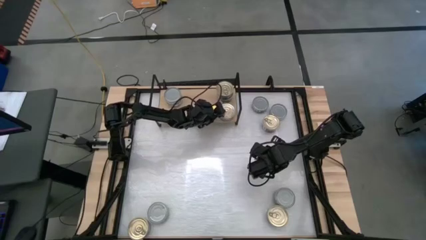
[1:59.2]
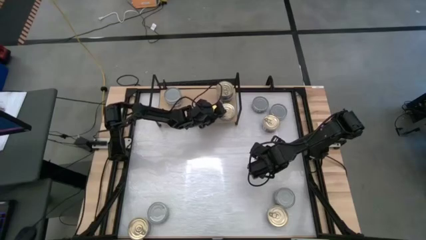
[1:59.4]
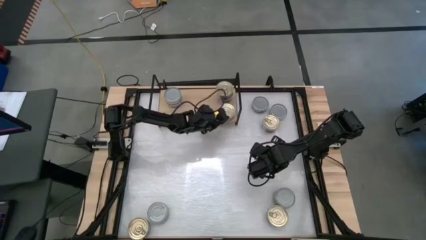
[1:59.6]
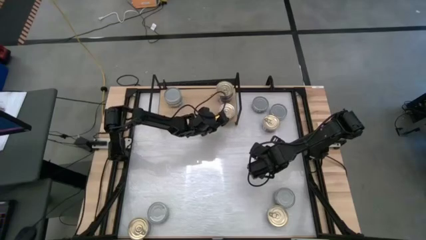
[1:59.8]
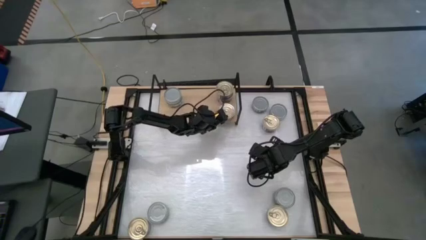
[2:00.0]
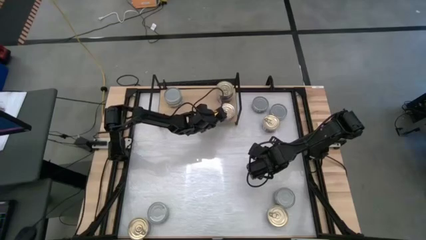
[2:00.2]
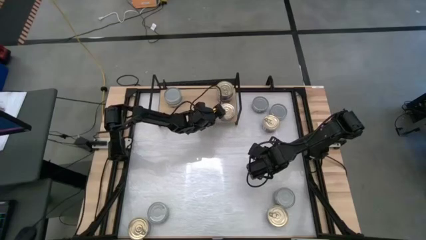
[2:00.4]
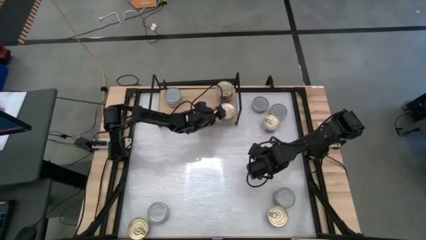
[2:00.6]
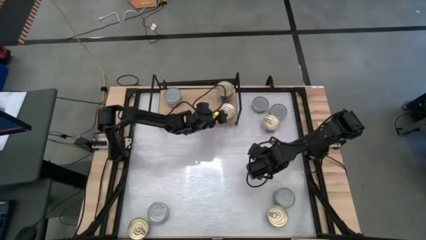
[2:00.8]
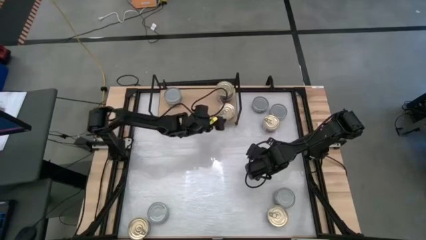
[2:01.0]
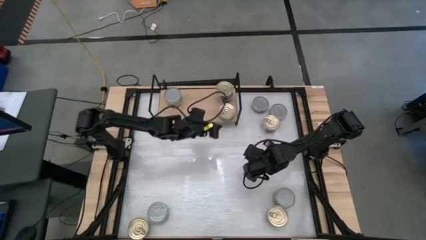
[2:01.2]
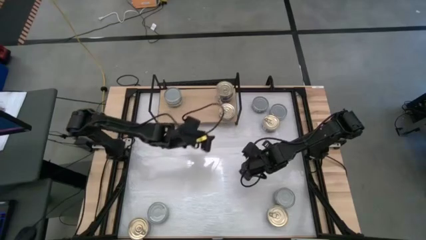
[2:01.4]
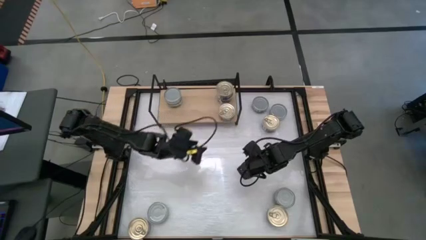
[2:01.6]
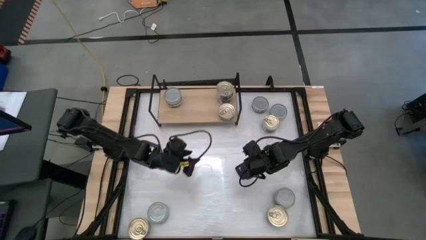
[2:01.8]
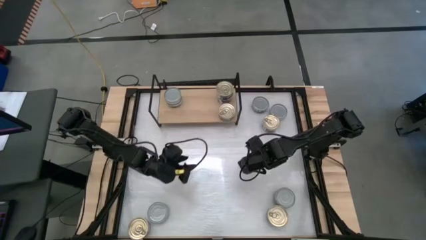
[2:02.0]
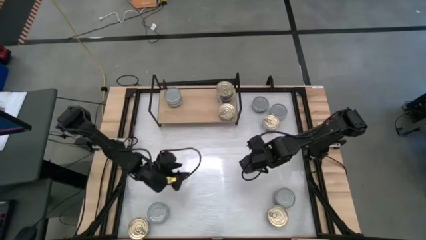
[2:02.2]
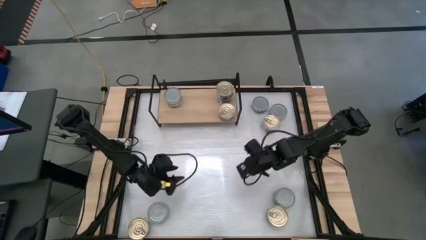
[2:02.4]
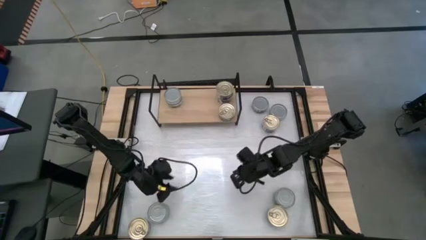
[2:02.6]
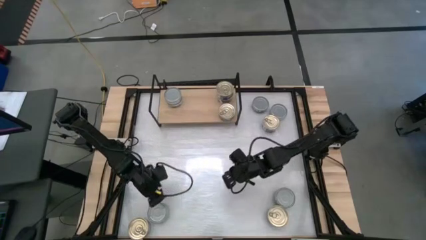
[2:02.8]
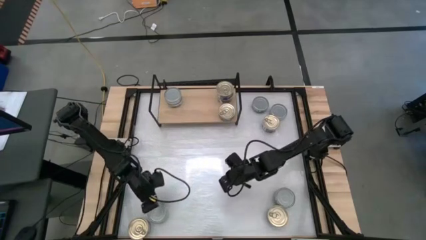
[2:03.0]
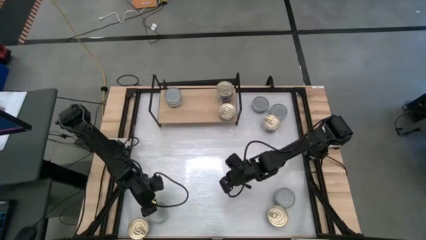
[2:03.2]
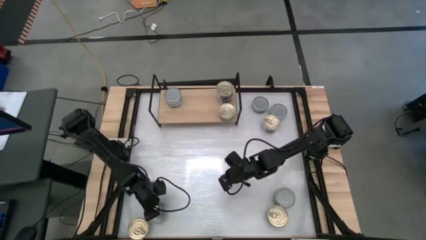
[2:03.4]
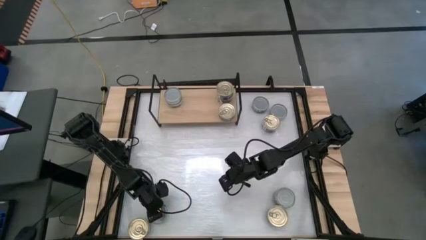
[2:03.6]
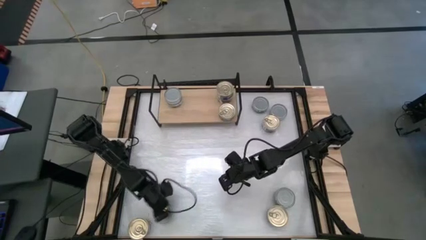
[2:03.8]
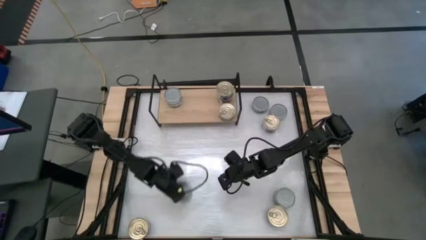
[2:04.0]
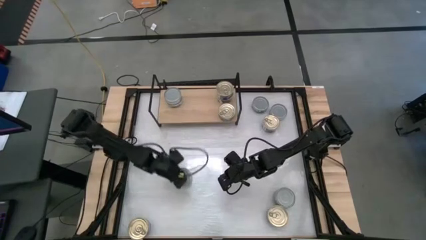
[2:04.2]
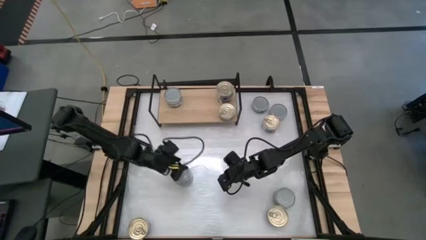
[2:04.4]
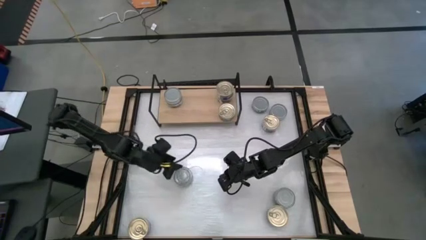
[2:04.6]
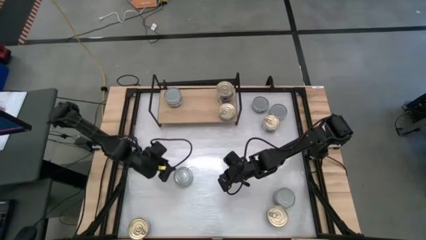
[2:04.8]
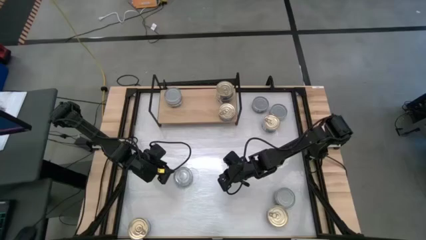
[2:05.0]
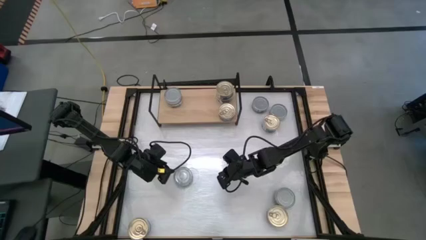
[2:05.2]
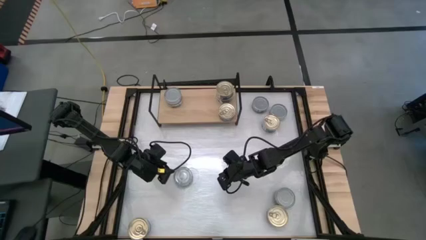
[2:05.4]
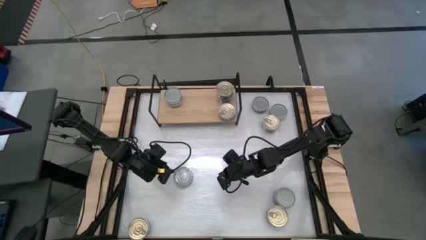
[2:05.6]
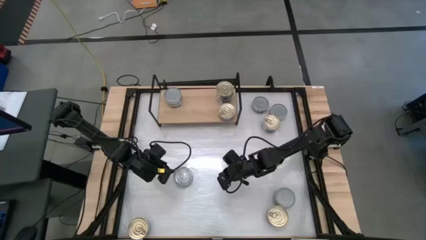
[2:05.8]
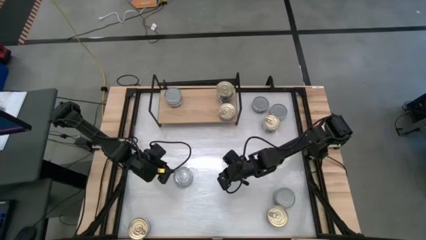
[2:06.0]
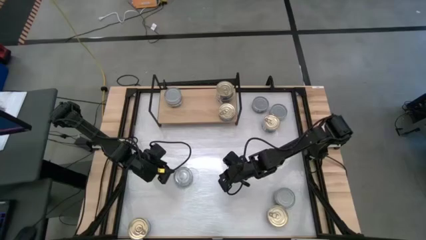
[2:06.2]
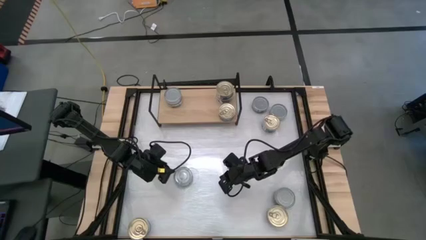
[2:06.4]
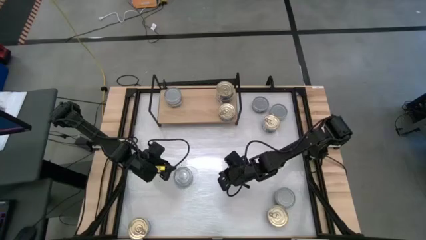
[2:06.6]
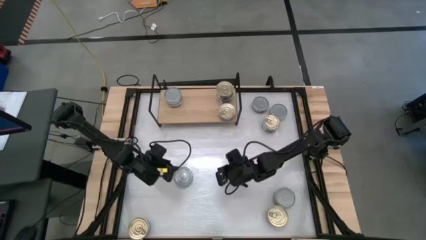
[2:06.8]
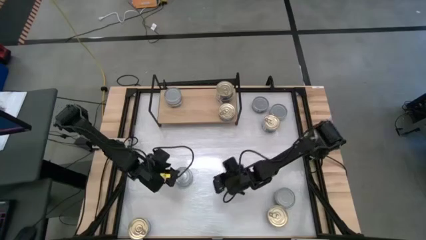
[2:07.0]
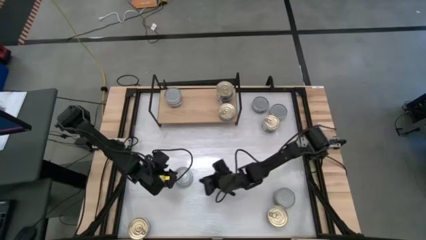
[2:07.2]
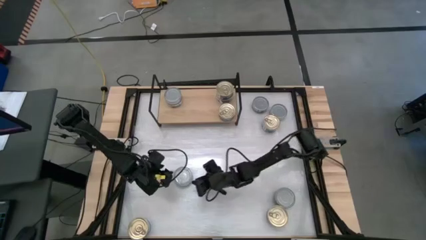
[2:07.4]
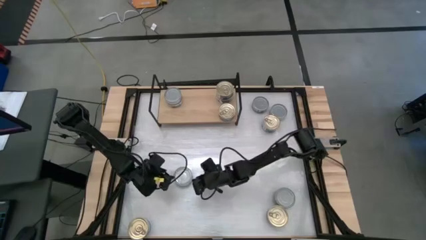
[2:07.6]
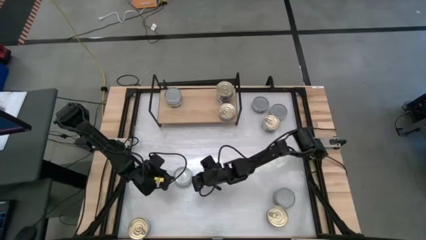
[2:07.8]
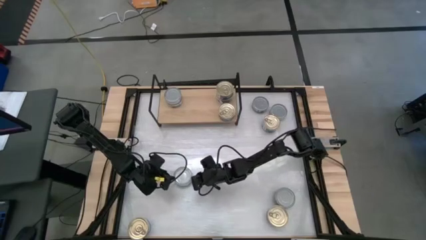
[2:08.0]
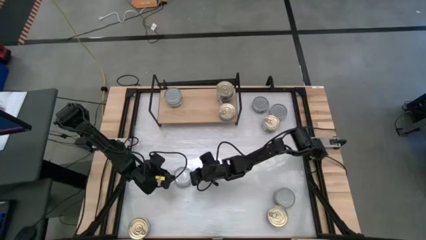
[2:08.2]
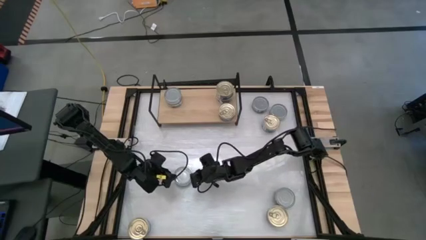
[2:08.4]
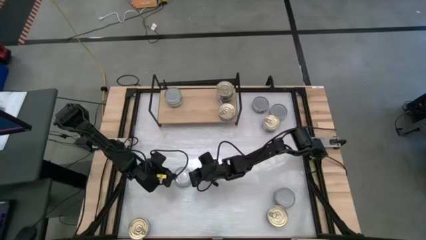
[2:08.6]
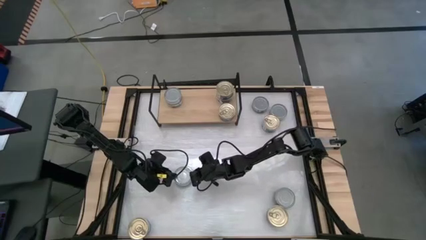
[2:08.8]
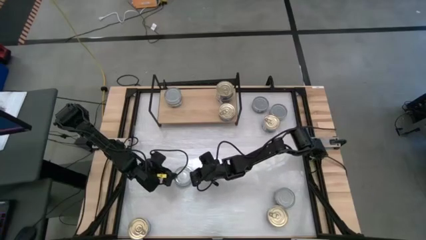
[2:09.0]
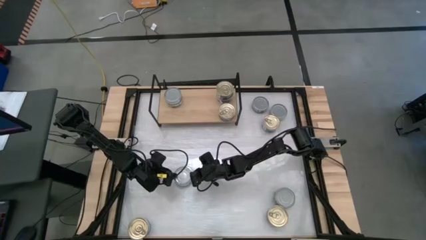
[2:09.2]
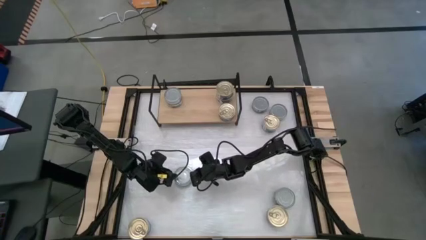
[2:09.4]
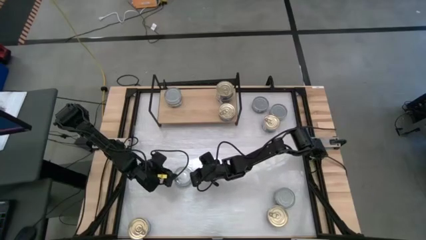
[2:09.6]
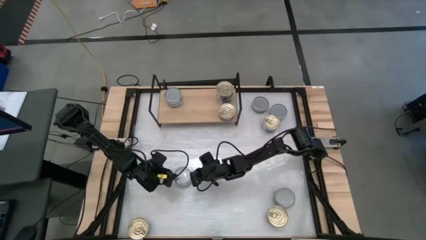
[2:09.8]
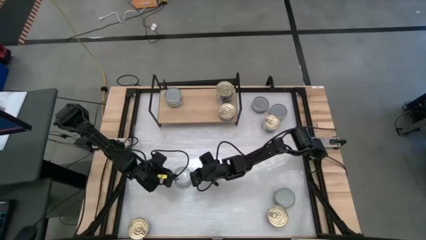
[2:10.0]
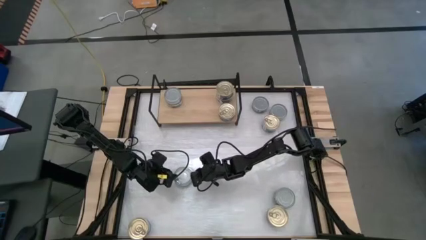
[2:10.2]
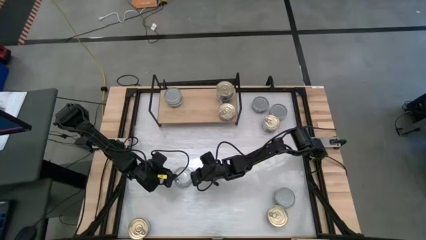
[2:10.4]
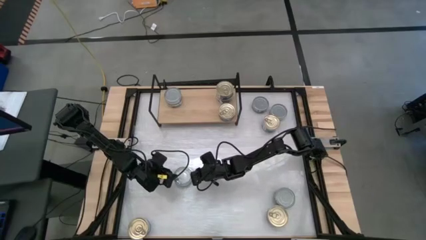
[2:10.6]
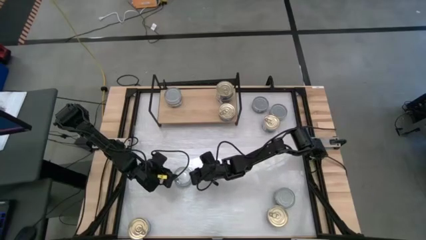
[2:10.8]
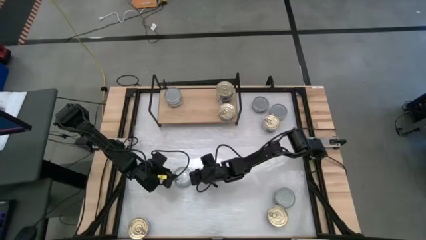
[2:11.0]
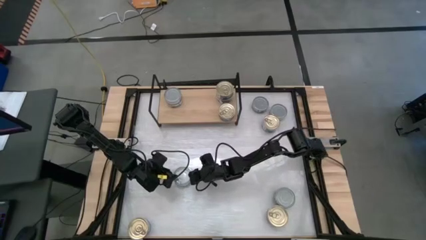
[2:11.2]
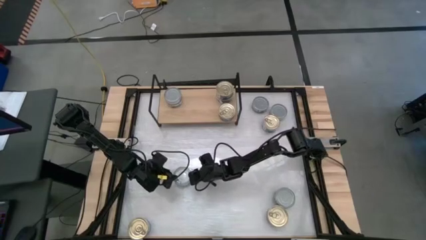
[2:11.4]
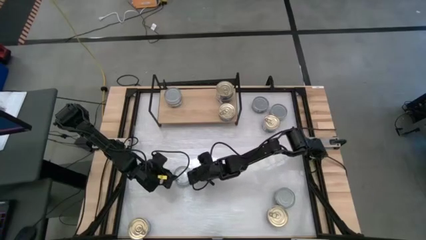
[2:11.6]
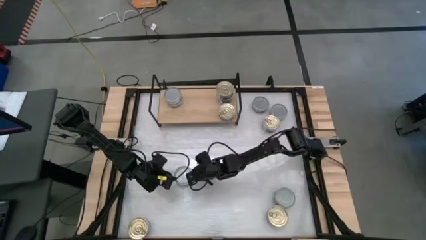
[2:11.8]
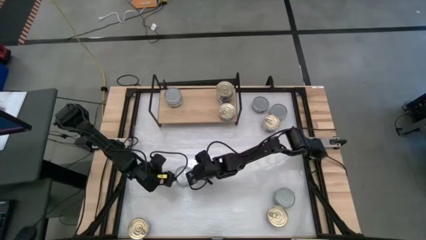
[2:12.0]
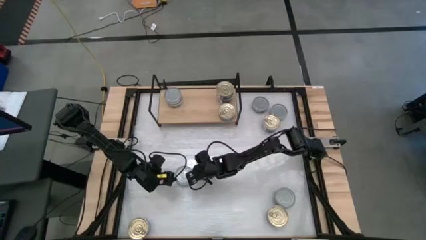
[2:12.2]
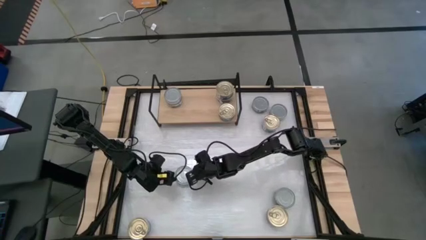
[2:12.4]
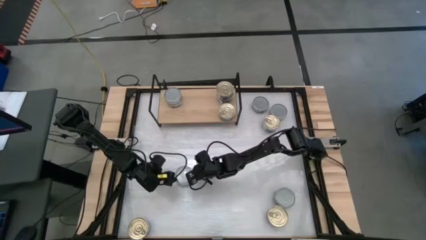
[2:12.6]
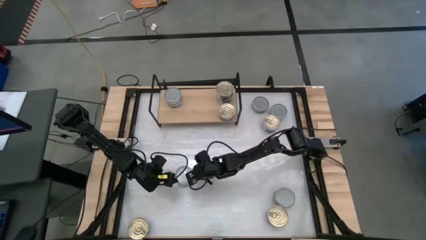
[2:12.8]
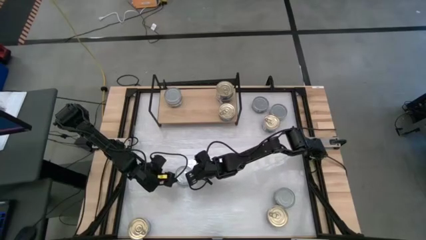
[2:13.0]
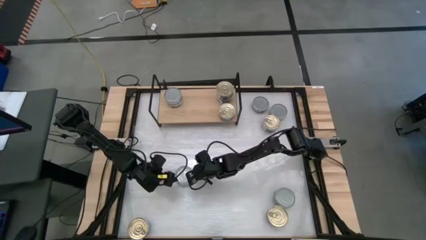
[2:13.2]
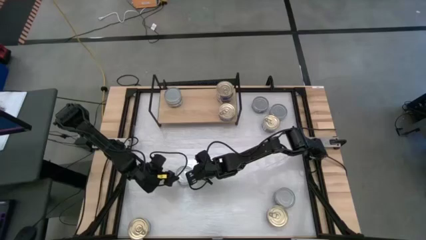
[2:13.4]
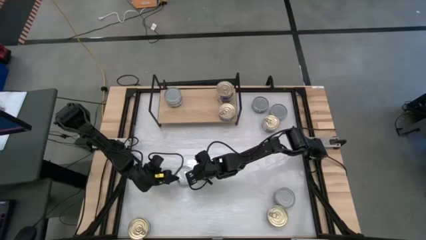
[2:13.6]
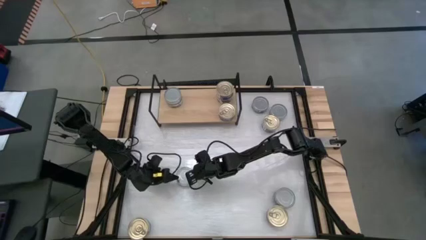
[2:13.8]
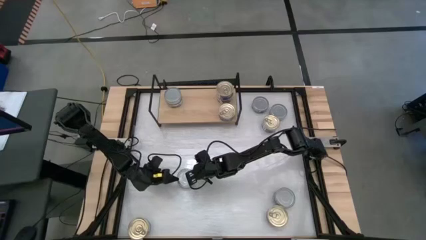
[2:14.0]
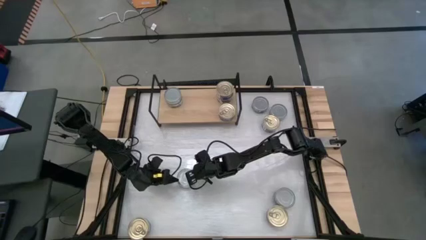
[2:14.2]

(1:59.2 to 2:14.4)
Task: Stack canned seafood by type on shelf
Put the green tuna can on the shelf

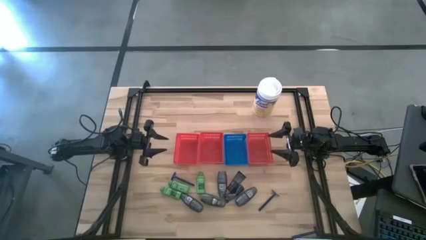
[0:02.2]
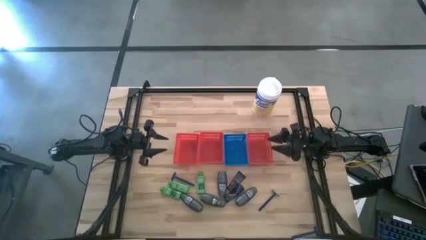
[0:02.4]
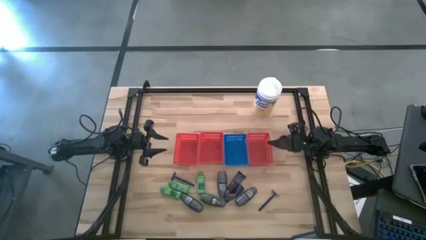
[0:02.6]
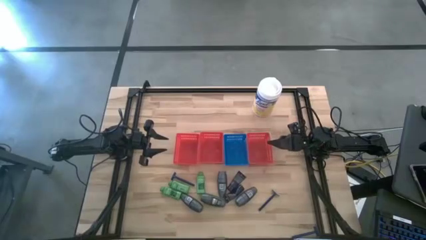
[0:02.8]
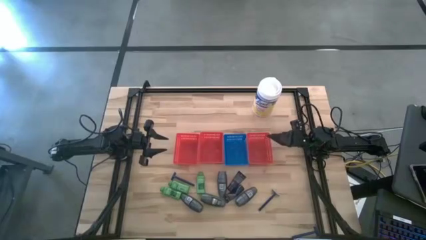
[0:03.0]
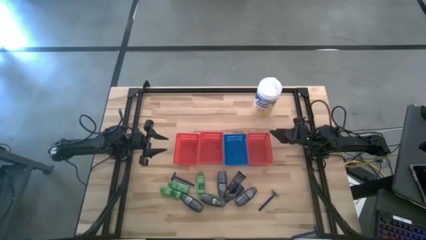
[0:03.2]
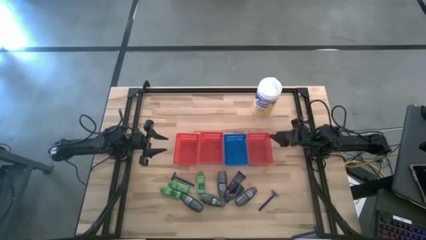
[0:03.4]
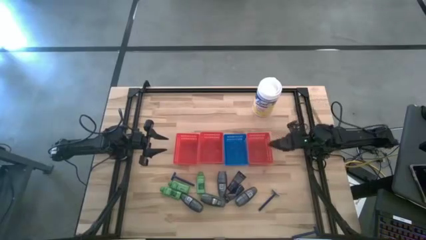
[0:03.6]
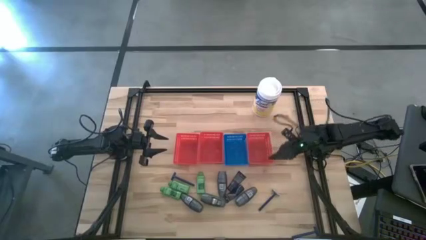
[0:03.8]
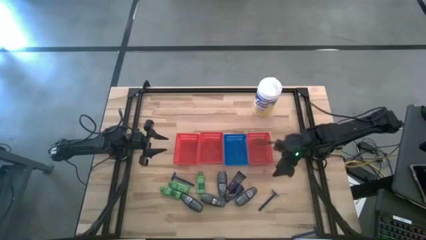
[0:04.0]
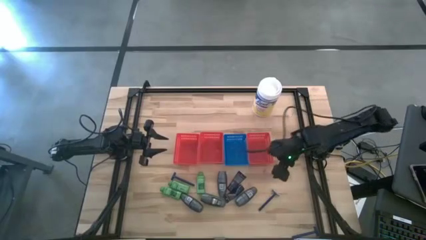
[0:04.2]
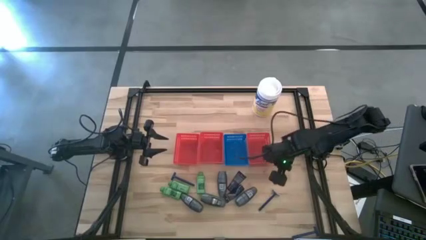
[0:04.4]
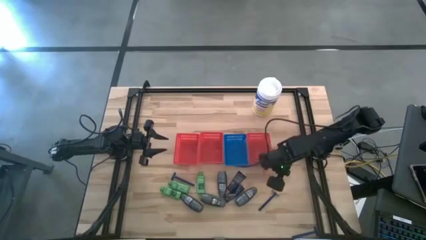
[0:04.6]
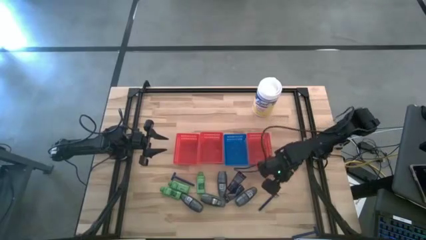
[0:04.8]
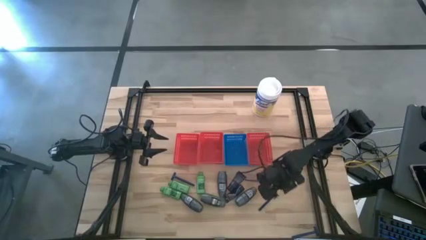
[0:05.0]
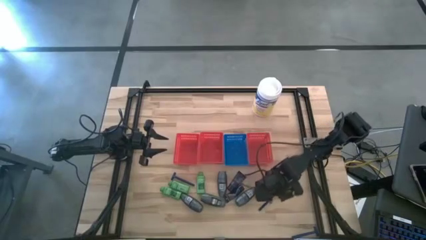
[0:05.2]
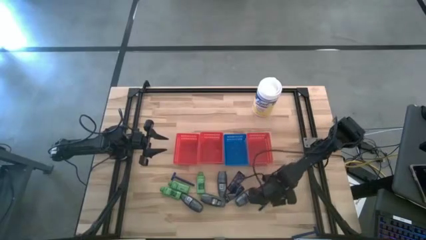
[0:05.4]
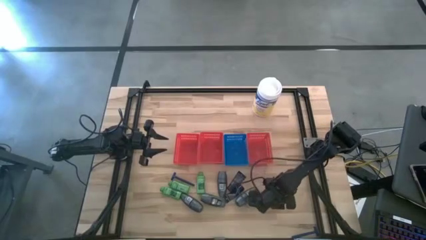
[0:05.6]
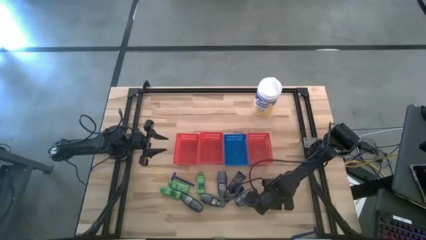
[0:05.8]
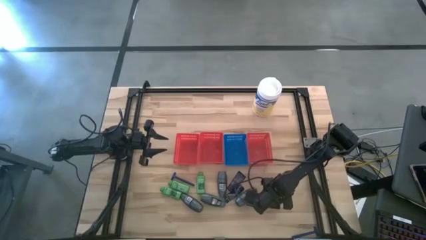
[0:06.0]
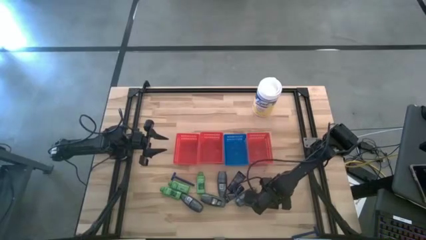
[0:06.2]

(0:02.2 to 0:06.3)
Task: Pick & Place Travel size toiletries
Put the razor into the right red bin
